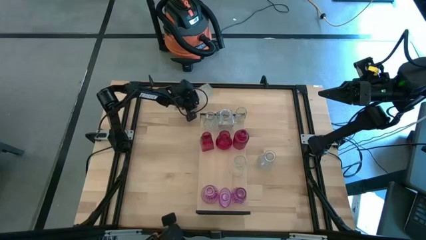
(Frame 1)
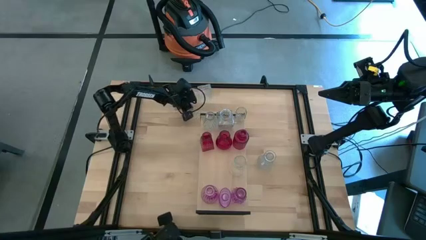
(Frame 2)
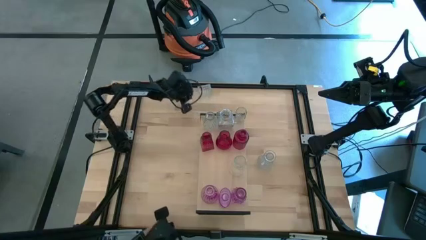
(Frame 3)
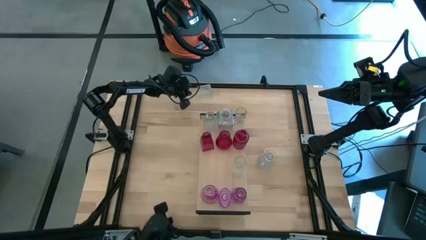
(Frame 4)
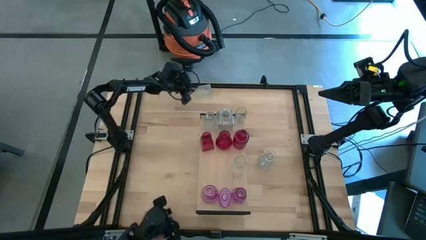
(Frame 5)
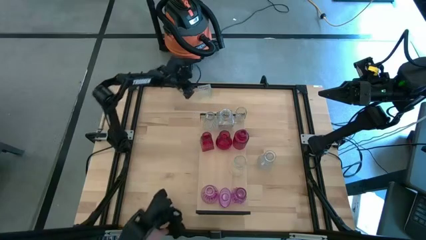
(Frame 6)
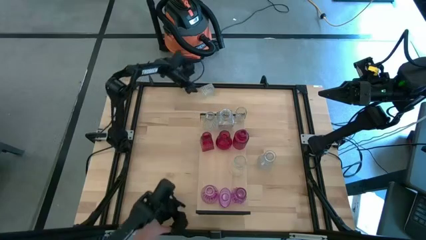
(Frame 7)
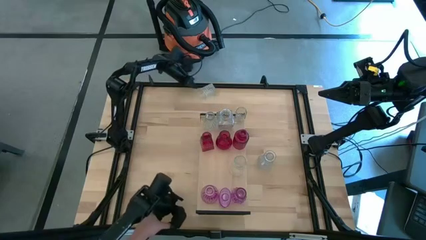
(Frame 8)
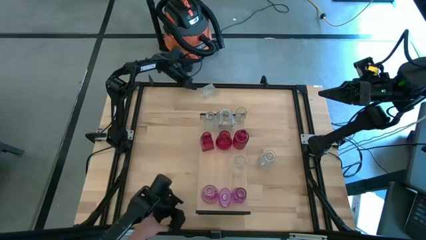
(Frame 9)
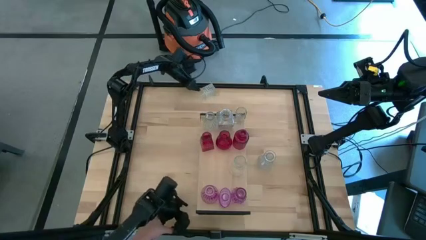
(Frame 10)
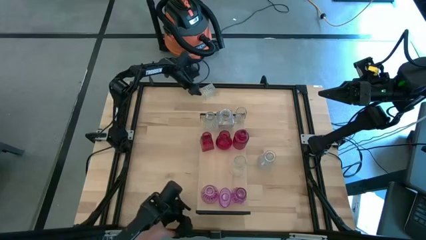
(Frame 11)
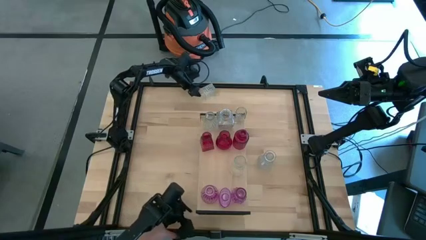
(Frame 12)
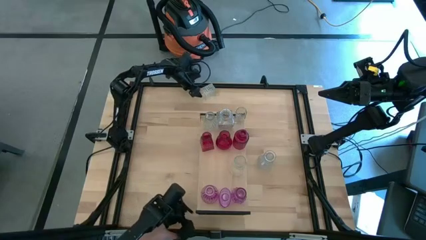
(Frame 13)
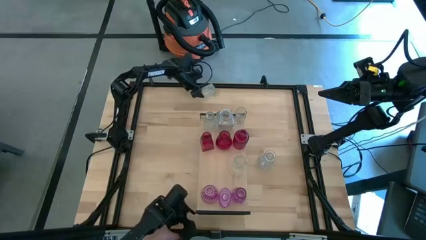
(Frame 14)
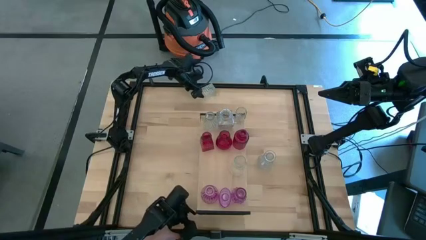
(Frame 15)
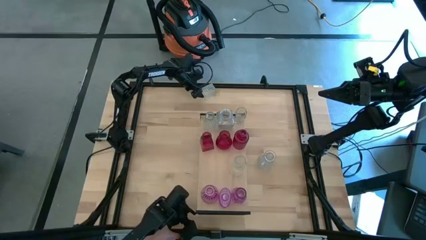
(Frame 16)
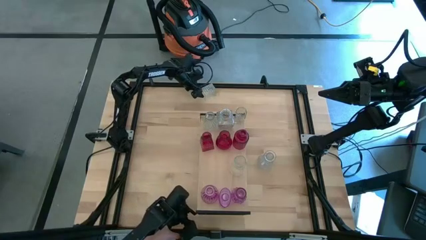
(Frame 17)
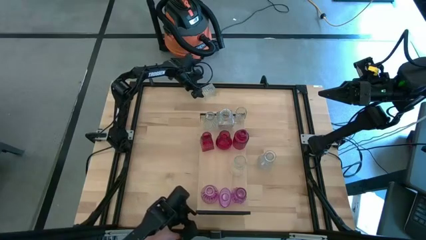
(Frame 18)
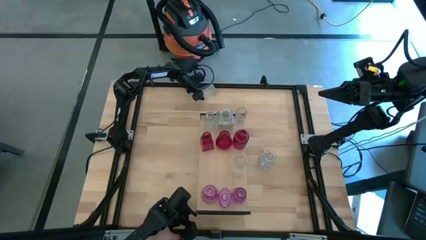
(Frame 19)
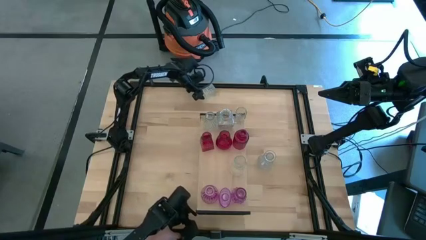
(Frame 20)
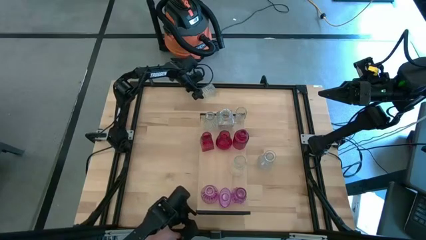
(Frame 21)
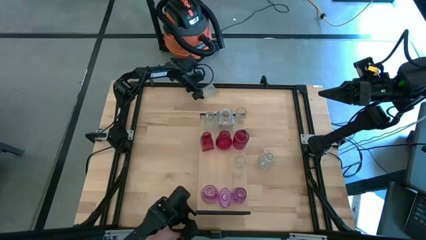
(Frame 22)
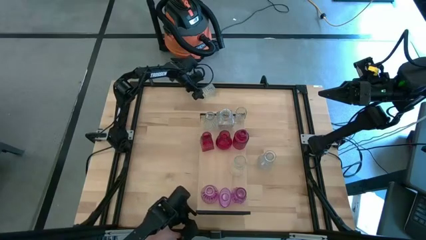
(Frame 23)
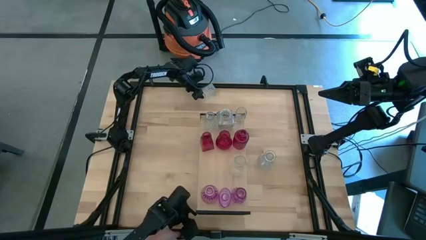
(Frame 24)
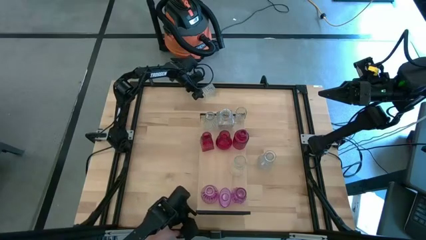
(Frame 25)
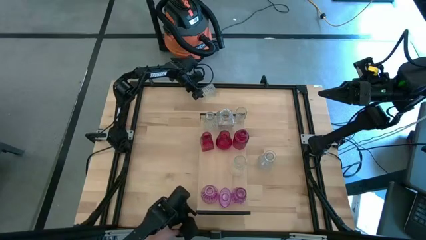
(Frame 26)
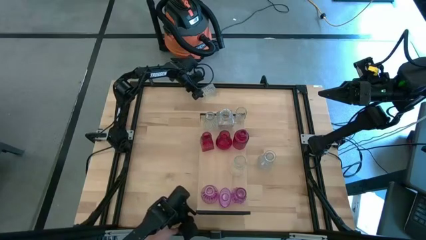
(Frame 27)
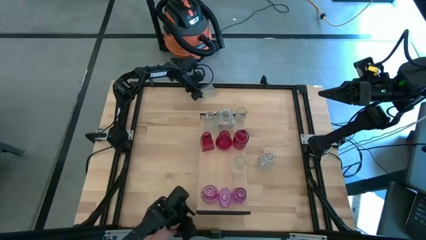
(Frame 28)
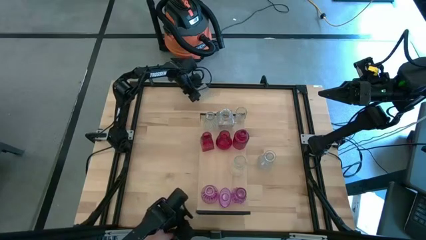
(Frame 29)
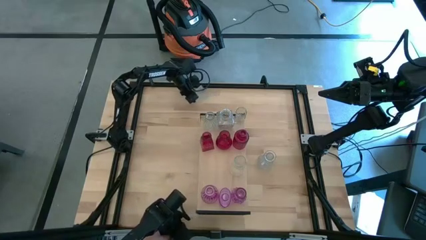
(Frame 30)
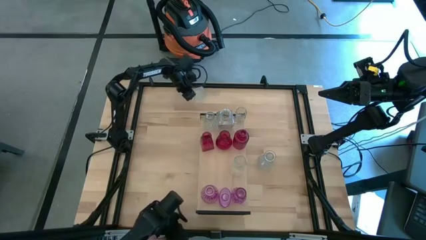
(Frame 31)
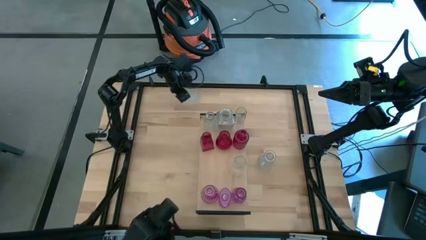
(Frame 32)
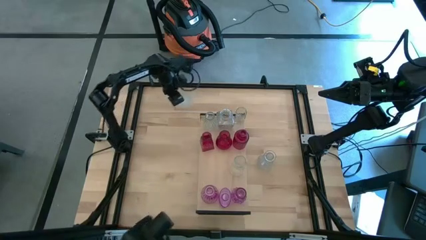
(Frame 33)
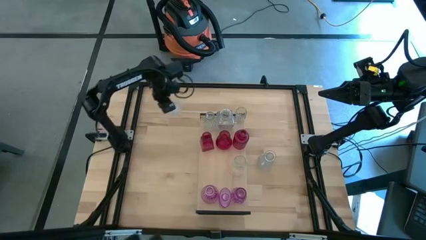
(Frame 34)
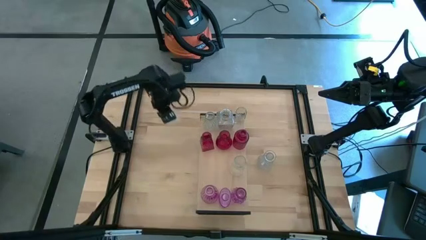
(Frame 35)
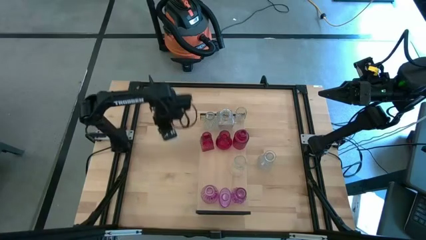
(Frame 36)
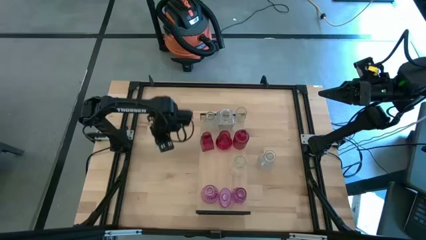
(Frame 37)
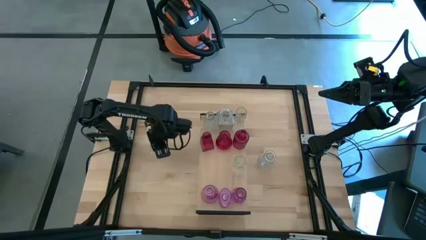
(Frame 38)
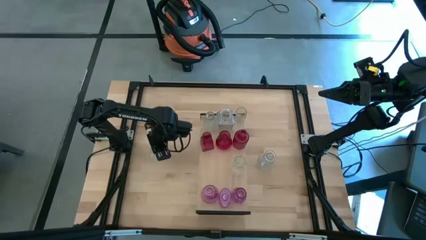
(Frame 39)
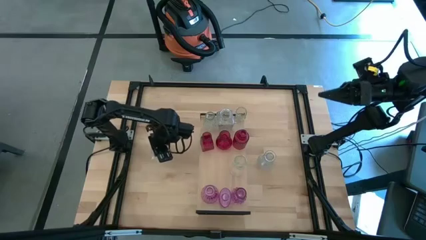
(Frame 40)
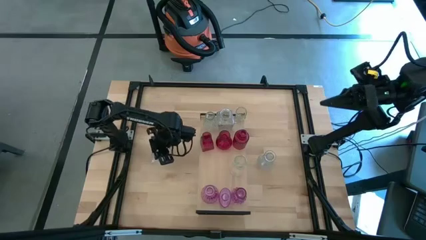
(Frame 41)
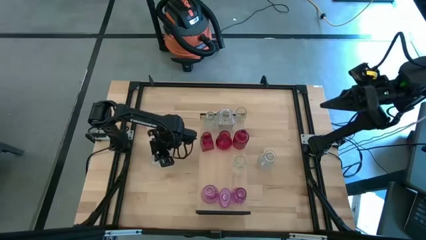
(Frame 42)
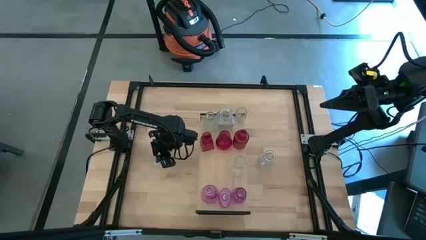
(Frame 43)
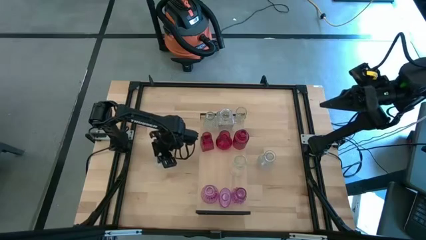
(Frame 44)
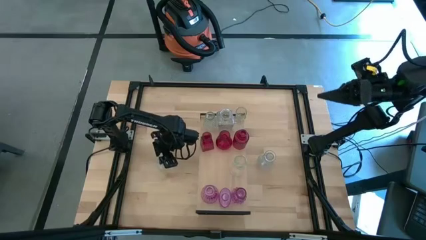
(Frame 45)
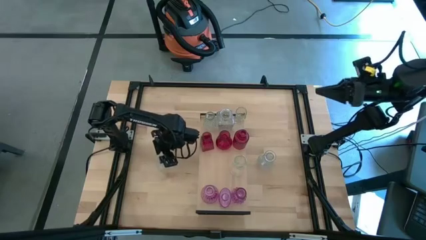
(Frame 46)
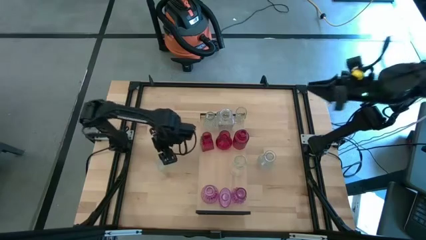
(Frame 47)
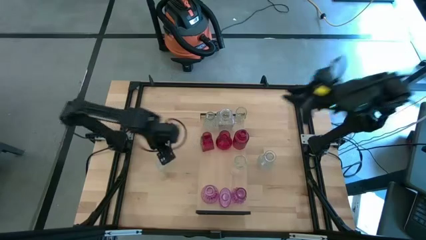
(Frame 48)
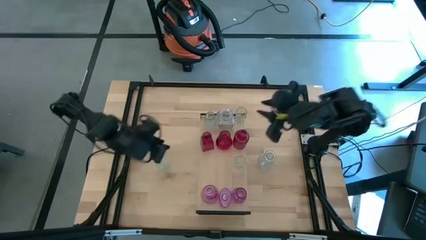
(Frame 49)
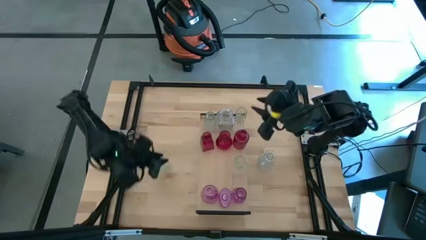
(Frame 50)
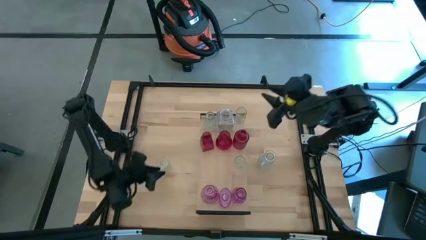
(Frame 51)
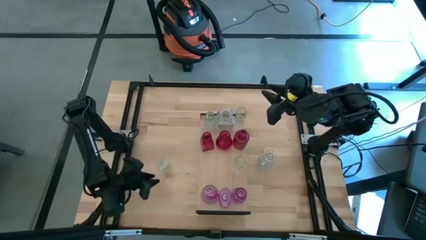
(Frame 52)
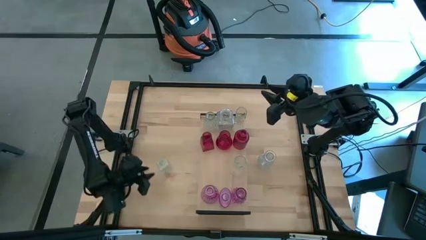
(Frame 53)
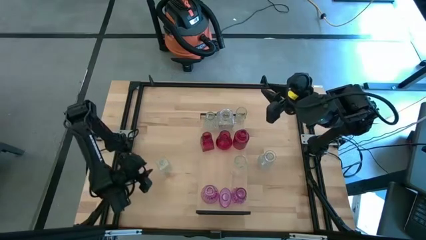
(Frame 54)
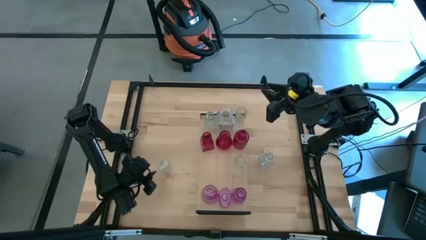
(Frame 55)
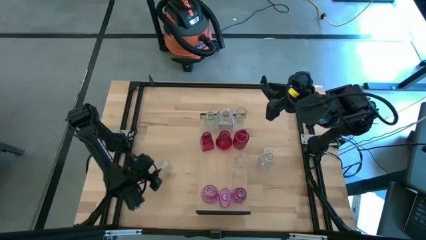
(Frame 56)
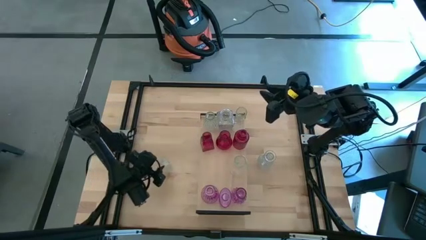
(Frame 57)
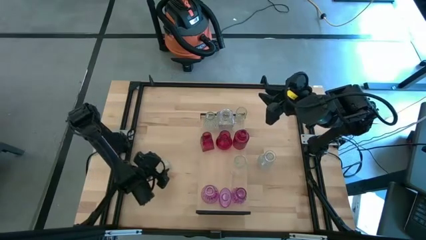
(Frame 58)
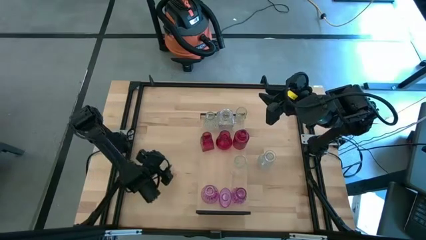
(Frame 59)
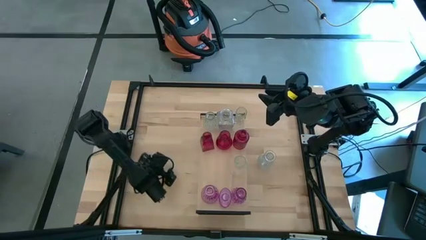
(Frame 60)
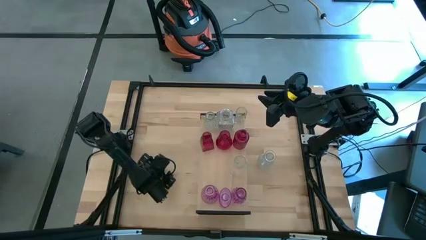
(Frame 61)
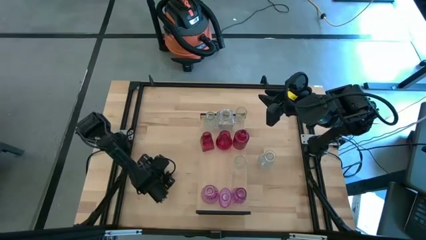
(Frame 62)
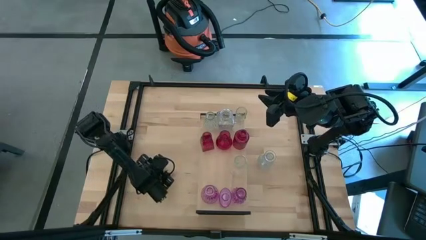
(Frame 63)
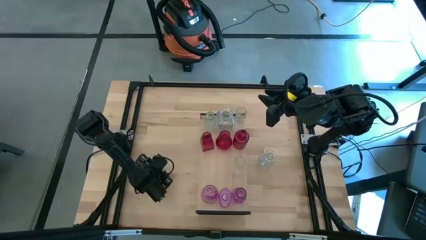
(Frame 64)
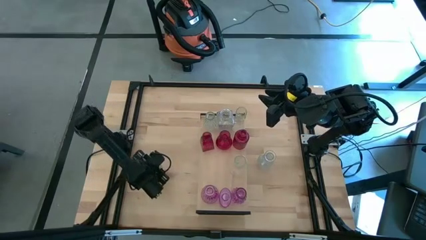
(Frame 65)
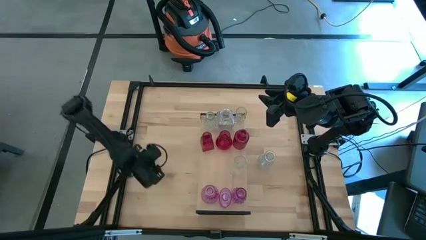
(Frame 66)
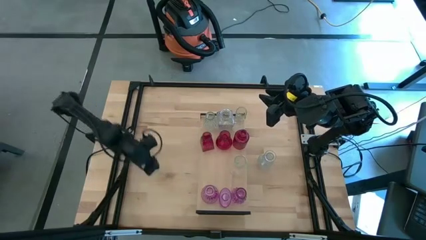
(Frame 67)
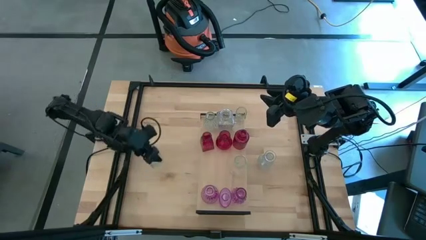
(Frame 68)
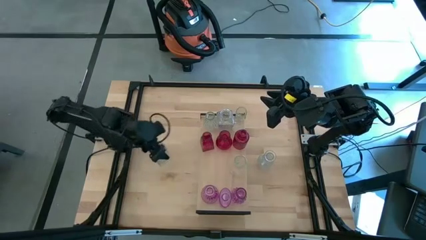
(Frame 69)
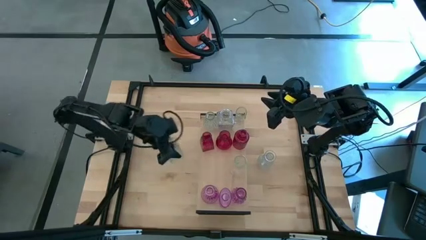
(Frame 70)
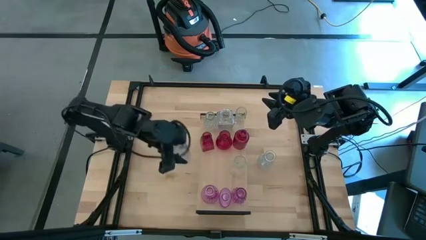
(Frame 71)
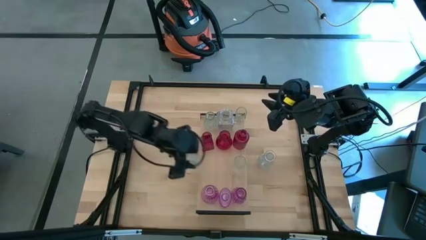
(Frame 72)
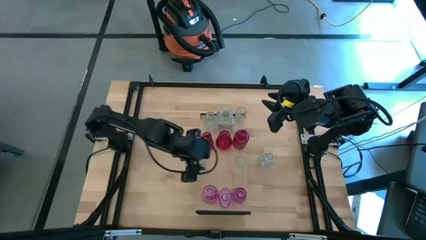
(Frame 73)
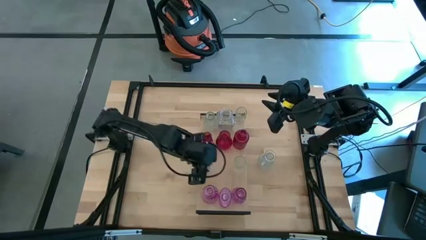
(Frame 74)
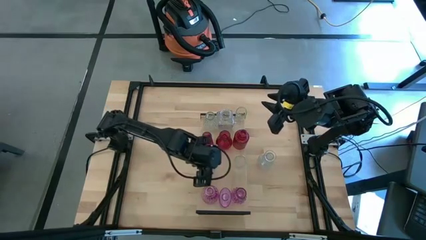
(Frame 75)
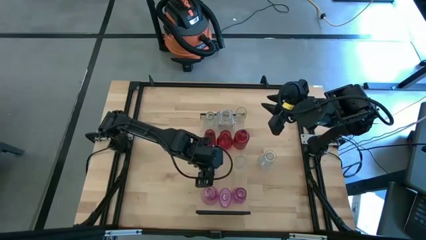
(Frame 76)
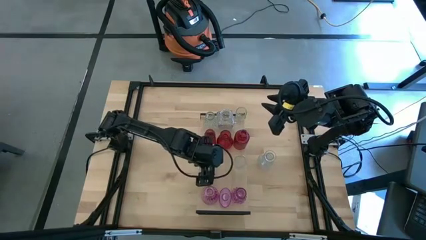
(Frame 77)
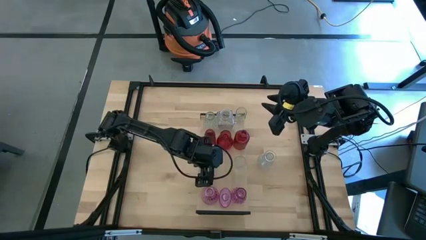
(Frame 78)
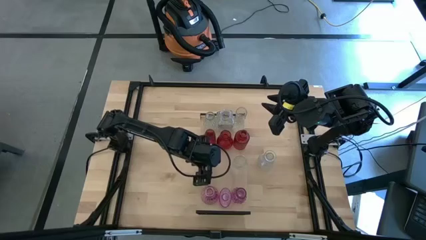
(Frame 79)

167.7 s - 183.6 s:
Task: sort vases onto shelf
Put the transparent vase on the shelf aligned with the transparent vase on the bottom

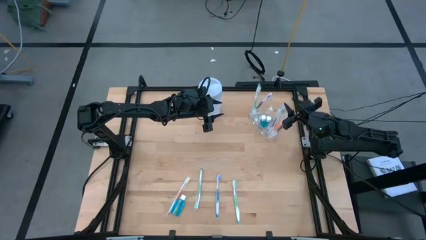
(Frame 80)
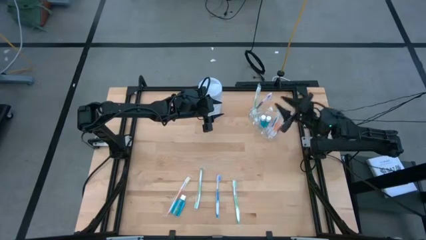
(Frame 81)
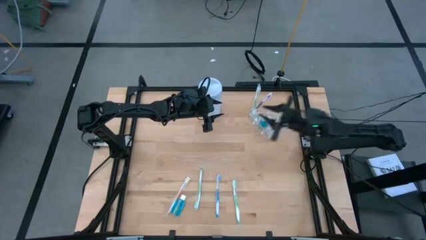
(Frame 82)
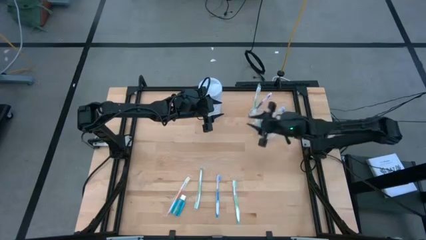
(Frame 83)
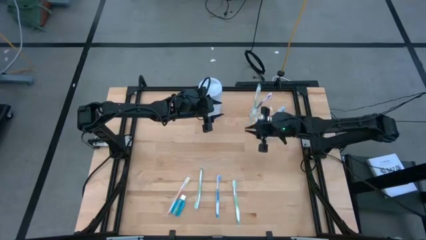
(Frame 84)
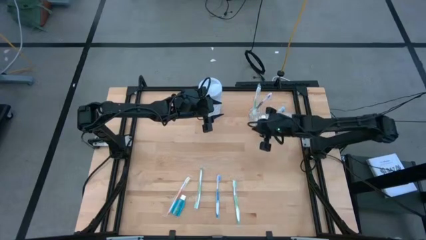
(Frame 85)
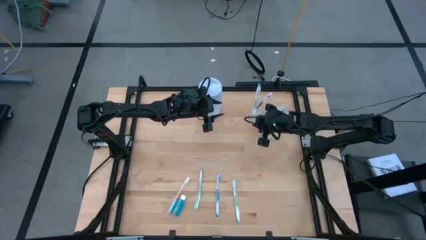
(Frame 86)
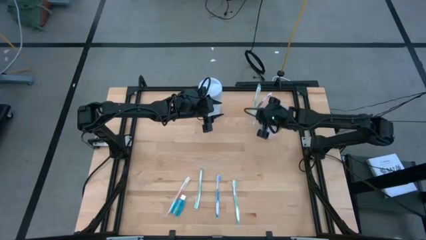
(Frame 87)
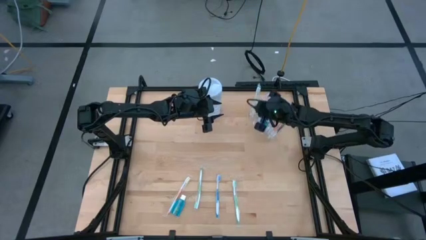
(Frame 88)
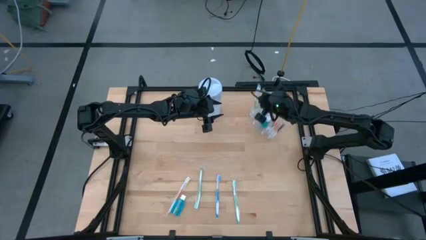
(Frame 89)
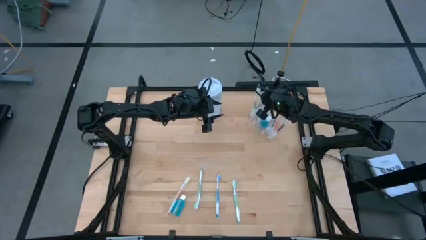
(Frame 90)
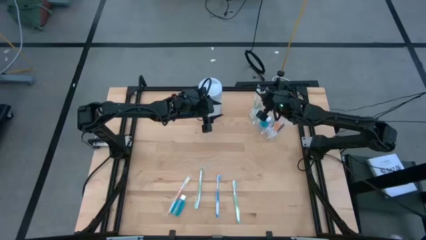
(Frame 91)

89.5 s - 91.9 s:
Task: Pick & Place toothbrushing station
Adjust the green toothbrush in the transparent organizer
